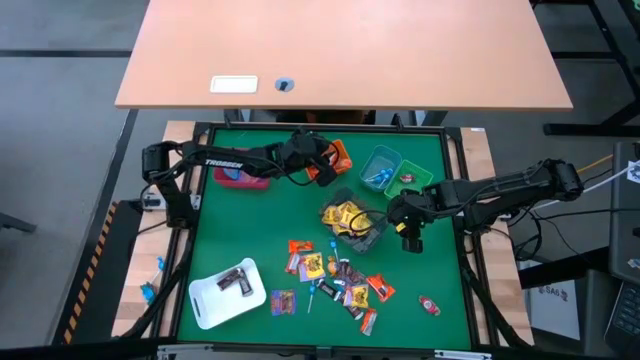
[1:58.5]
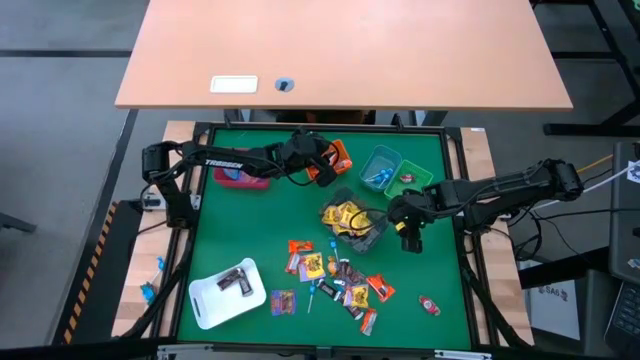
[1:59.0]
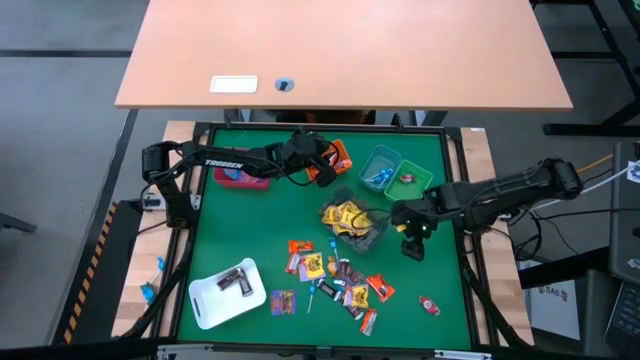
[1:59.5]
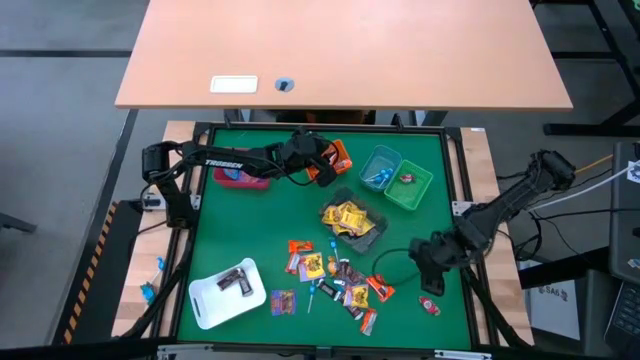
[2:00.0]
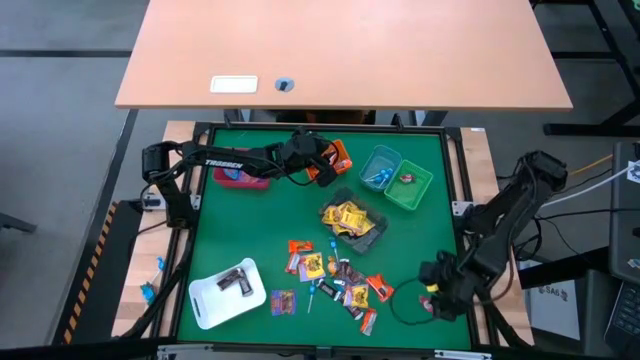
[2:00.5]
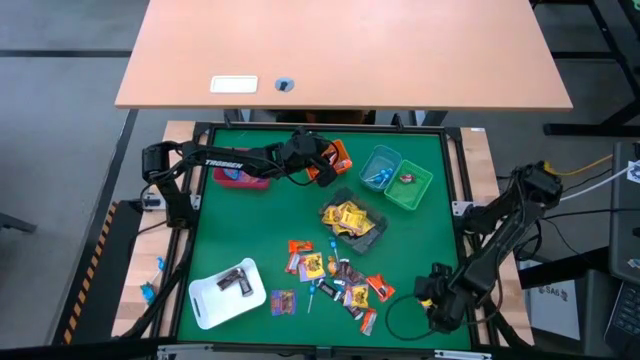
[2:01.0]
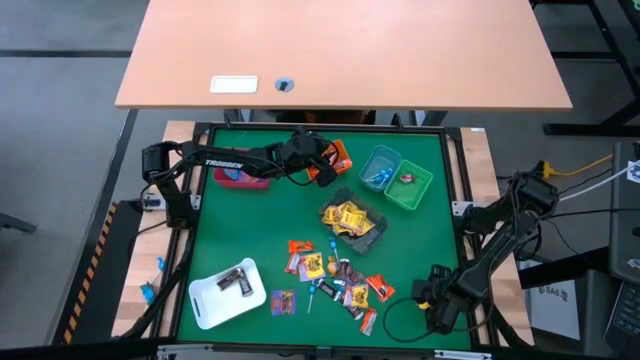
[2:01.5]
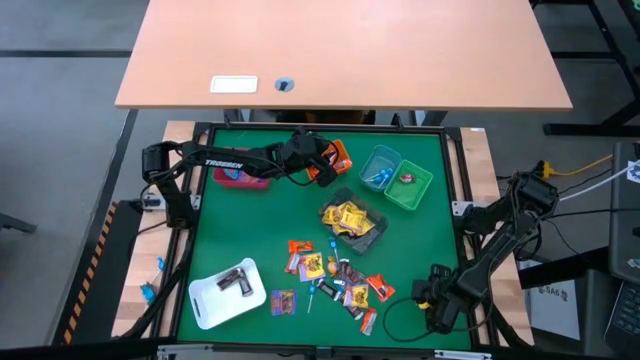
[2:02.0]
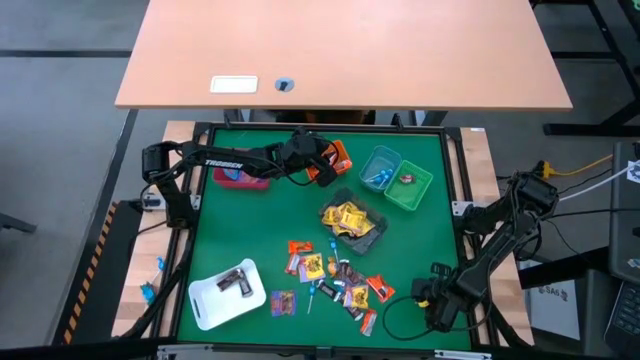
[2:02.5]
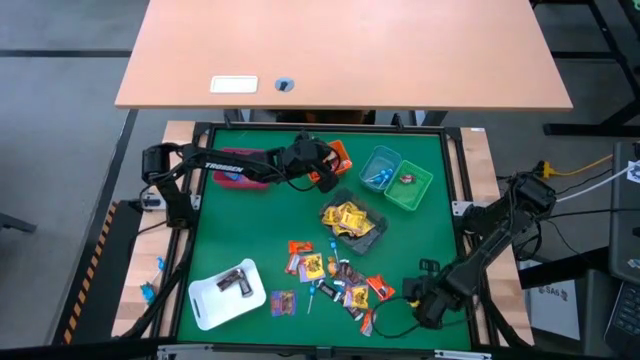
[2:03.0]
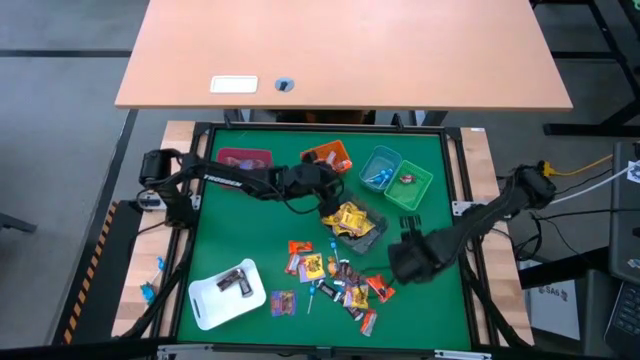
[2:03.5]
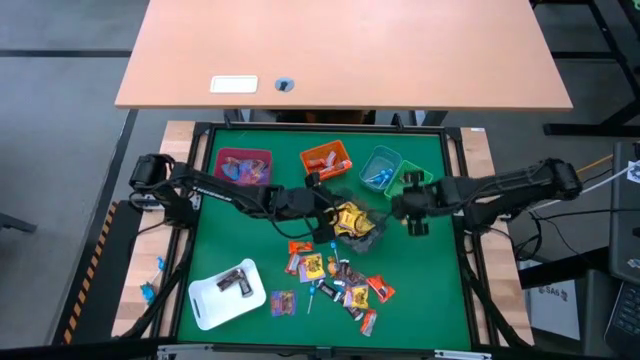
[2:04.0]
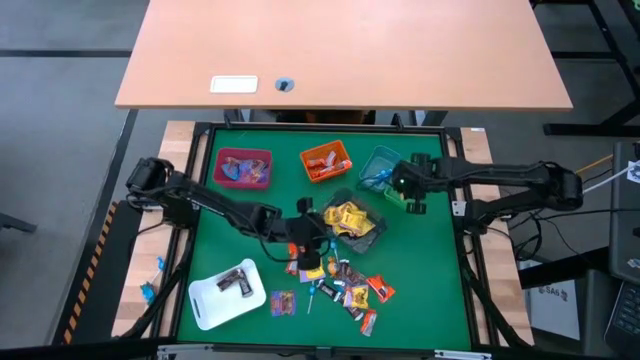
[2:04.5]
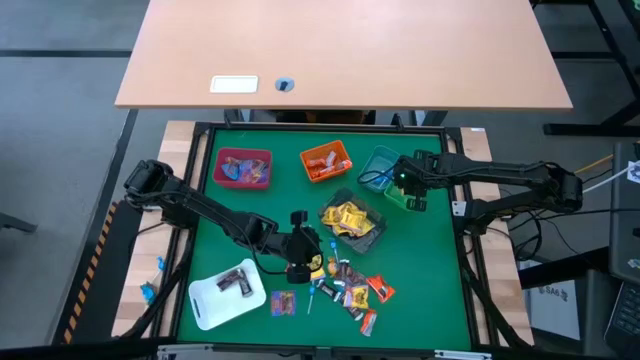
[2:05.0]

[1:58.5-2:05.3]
Task: Sort candy
Put the red chocolate into the green bin

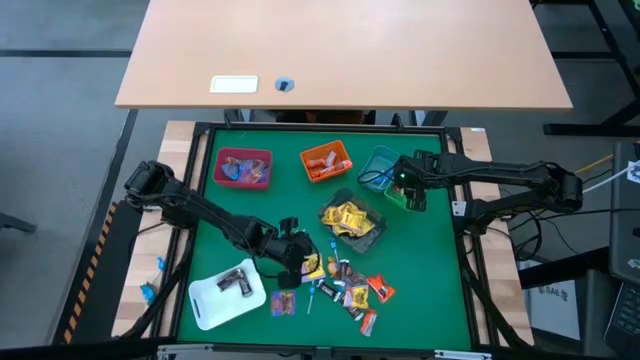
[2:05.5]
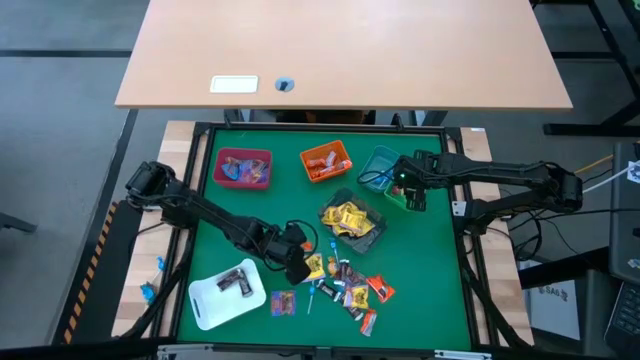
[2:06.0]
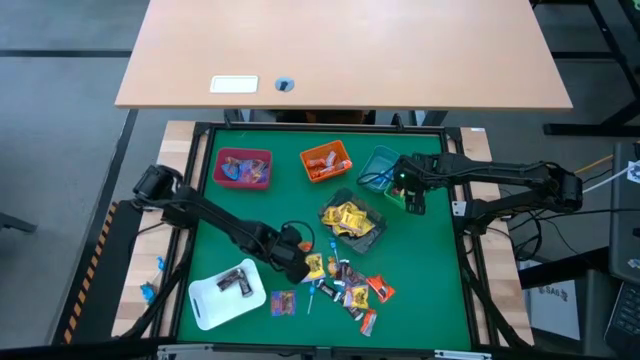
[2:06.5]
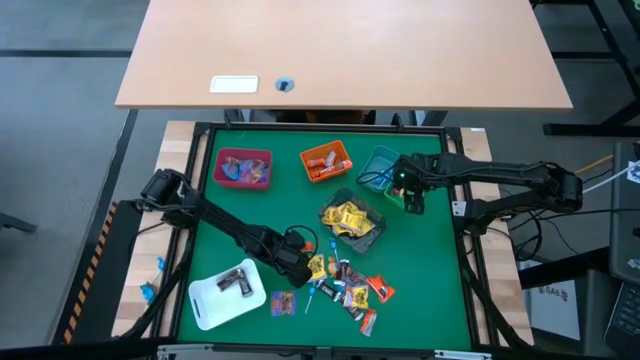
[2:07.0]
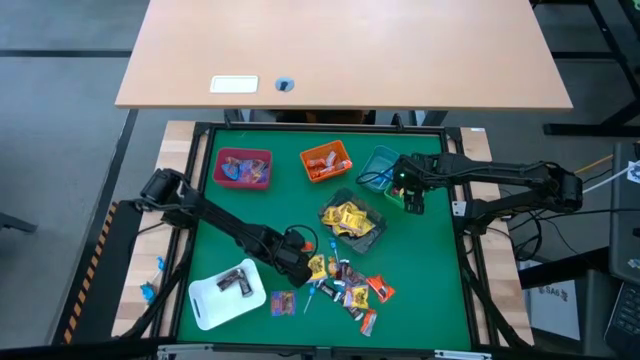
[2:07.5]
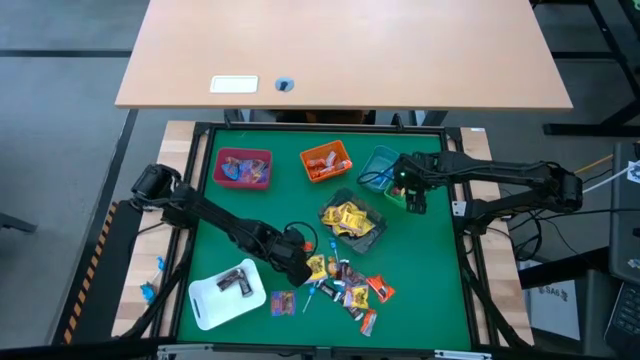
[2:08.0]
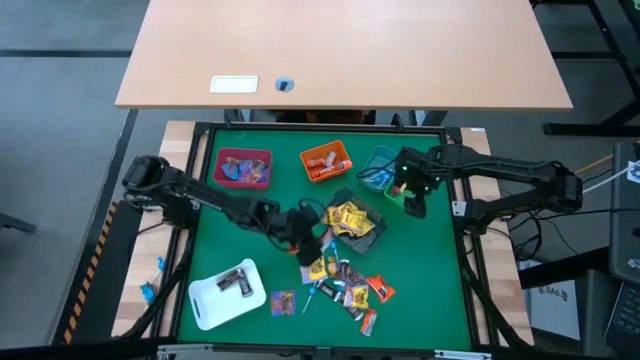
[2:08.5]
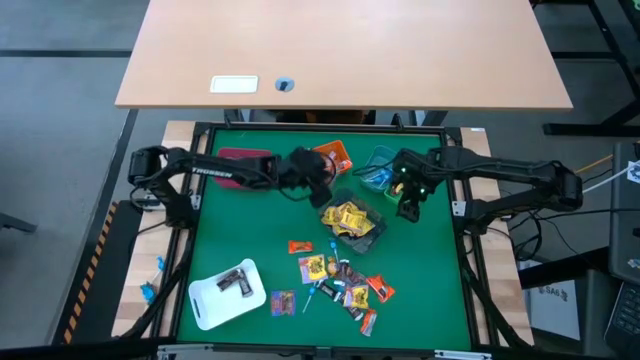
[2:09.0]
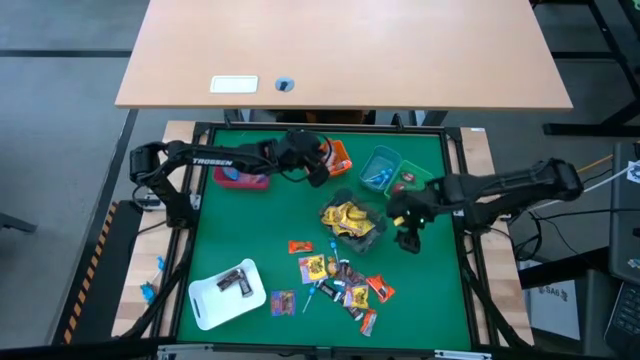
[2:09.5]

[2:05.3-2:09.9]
Put the orange chocolate into the orange bin

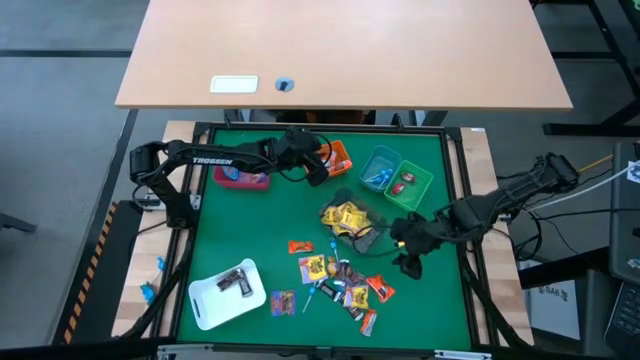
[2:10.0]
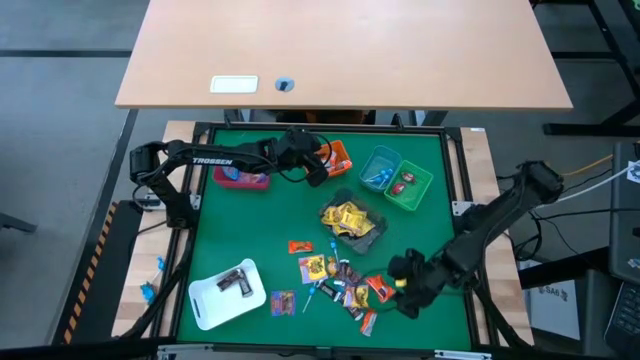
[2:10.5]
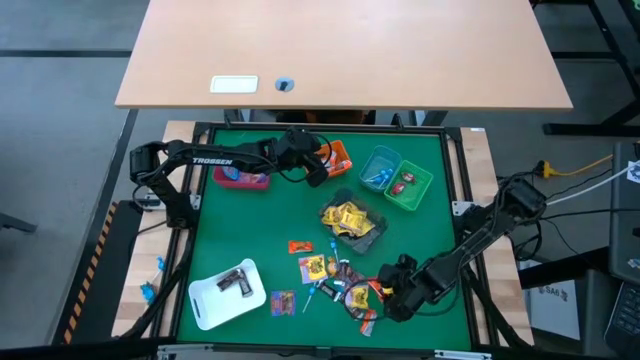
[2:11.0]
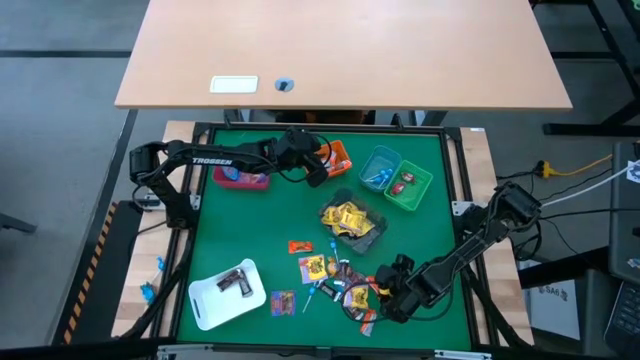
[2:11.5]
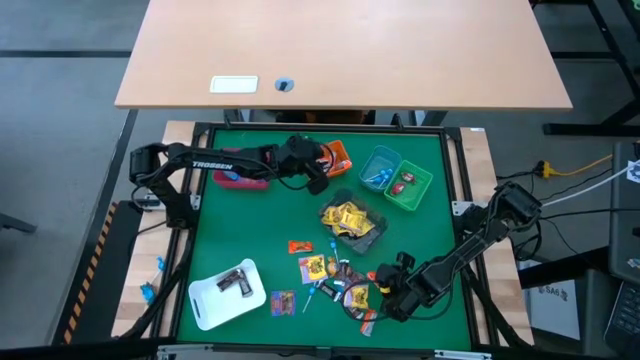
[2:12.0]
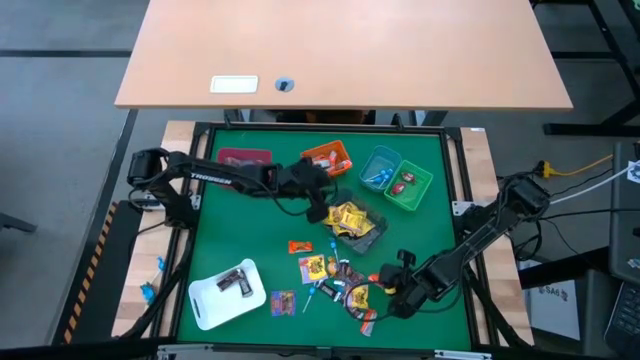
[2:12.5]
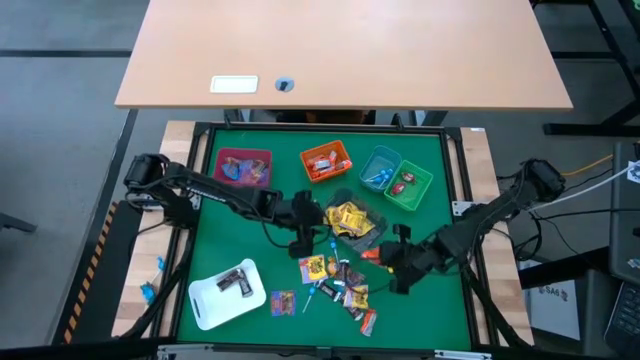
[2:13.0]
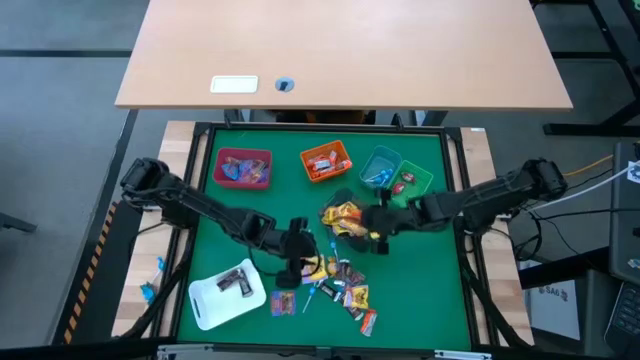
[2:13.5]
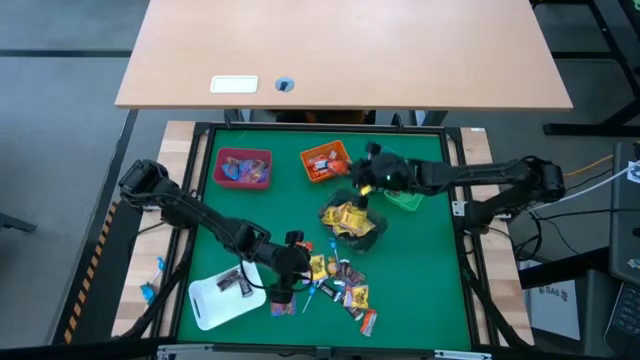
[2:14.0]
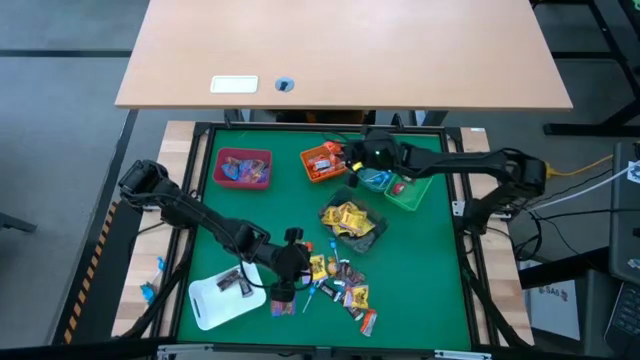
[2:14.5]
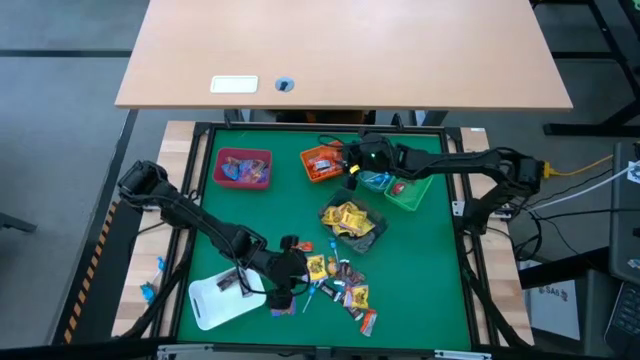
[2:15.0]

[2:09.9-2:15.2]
Put the orange chocolate into the orange bin

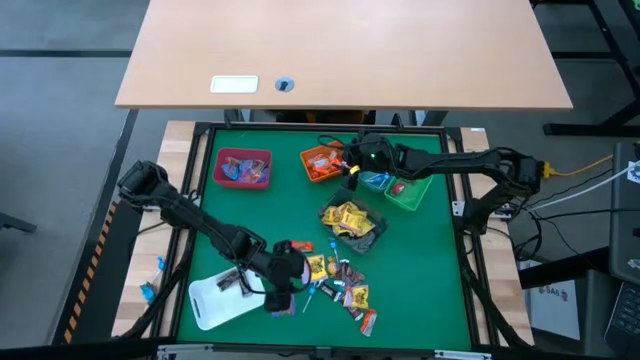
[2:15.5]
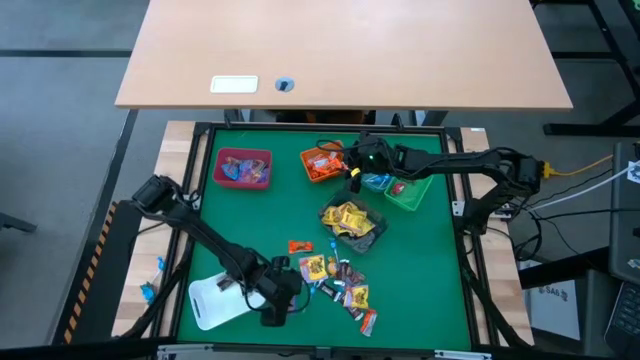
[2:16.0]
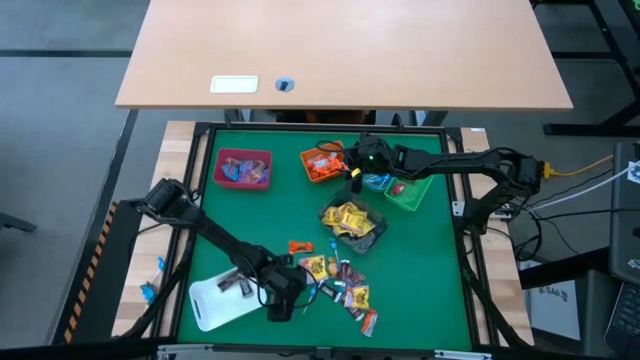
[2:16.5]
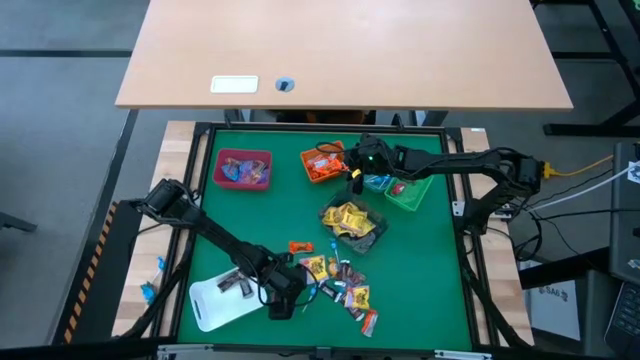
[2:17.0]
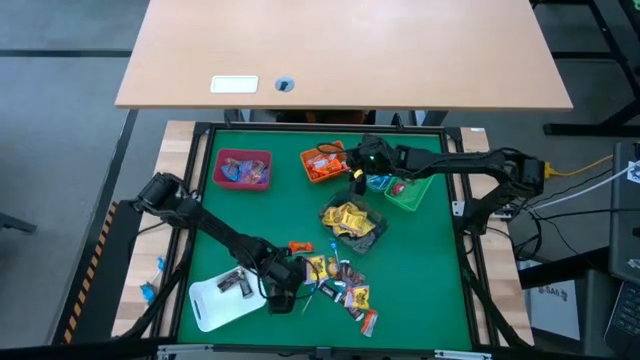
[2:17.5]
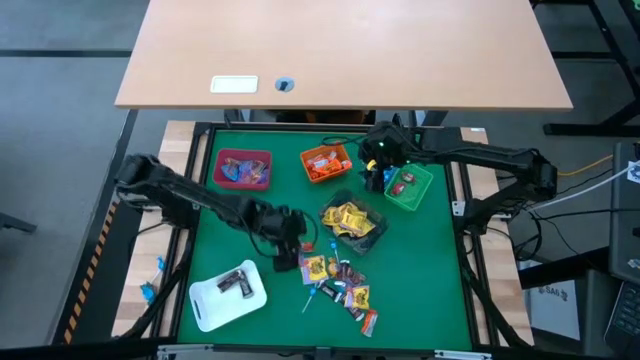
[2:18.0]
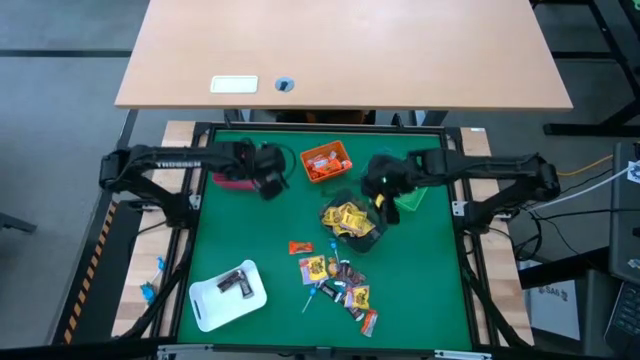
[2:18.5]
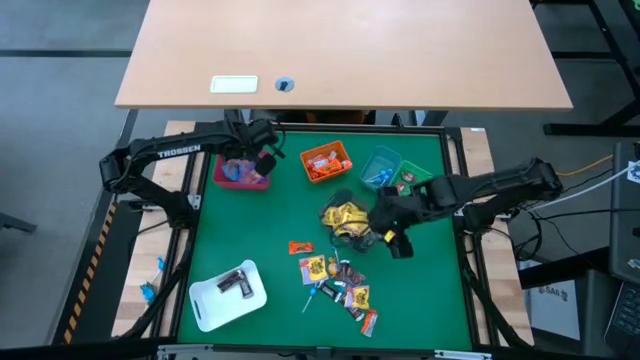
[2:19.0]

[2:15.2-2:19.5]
Put the purple gummy pack into the red bin
